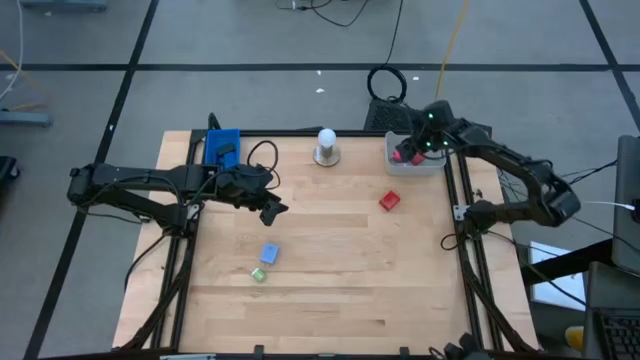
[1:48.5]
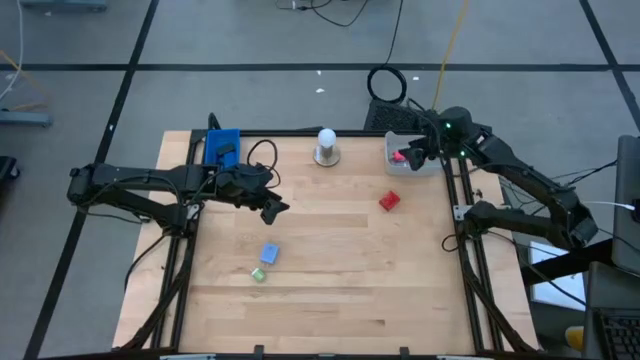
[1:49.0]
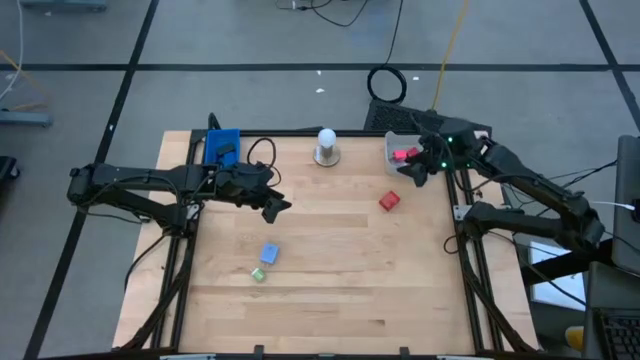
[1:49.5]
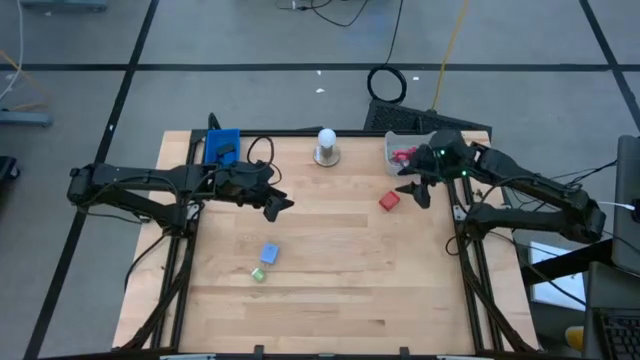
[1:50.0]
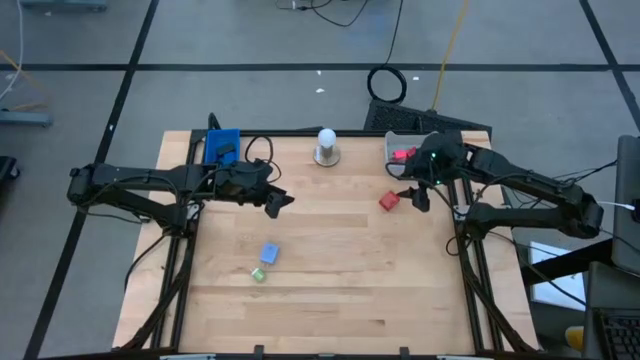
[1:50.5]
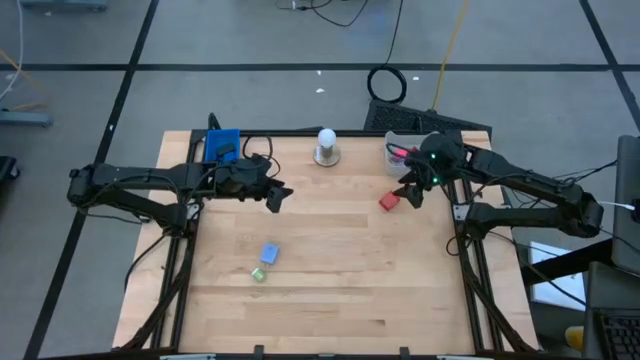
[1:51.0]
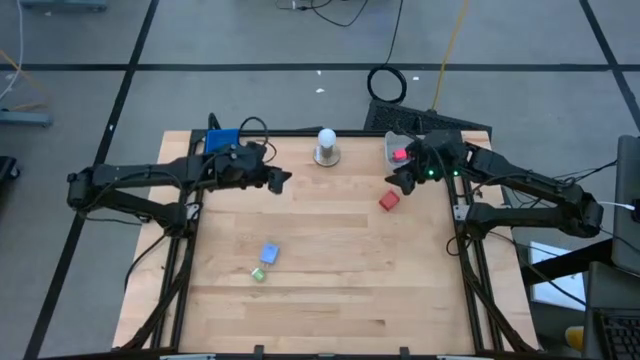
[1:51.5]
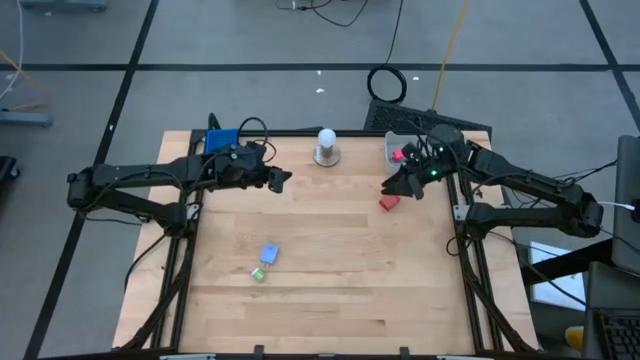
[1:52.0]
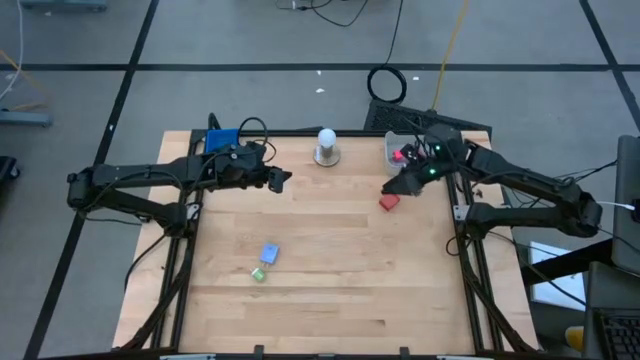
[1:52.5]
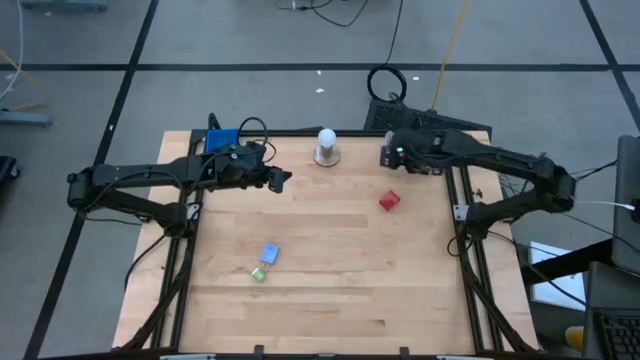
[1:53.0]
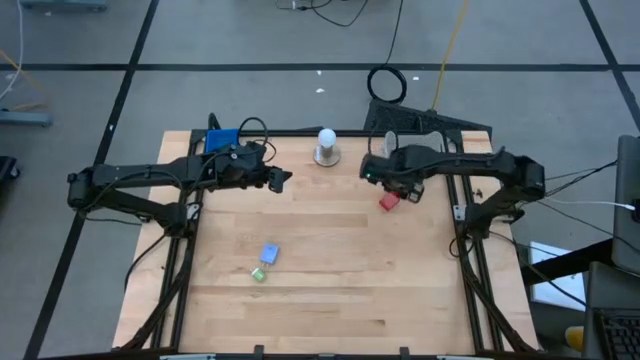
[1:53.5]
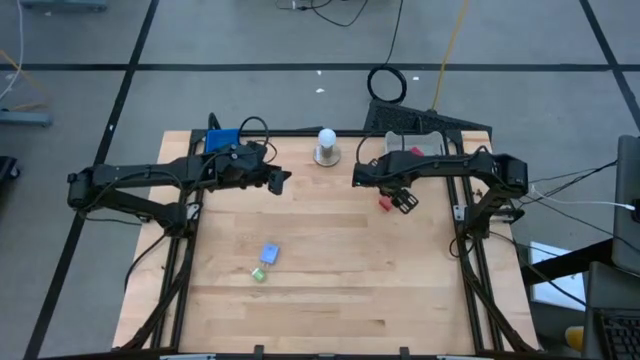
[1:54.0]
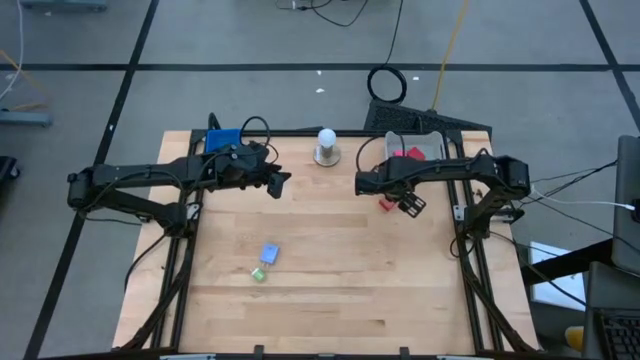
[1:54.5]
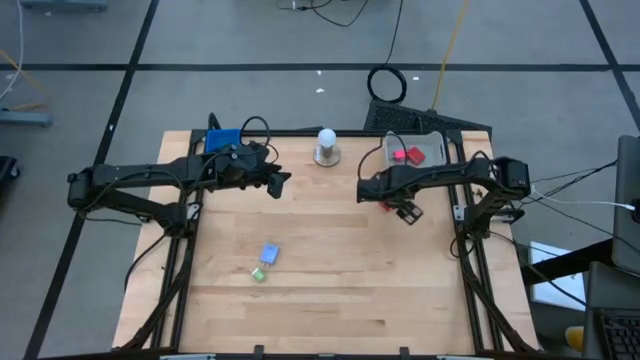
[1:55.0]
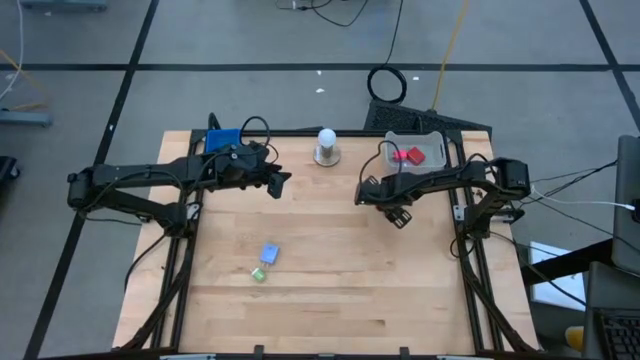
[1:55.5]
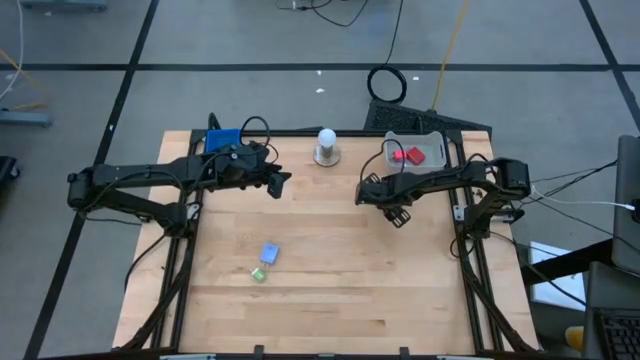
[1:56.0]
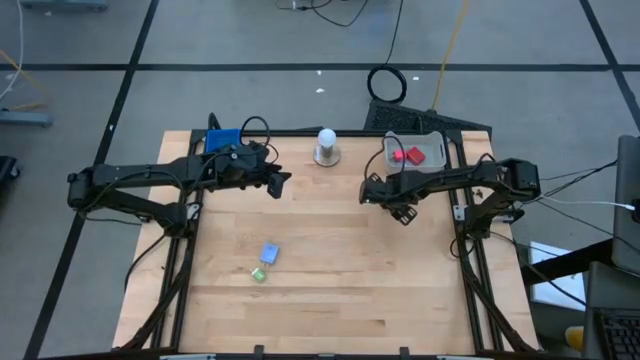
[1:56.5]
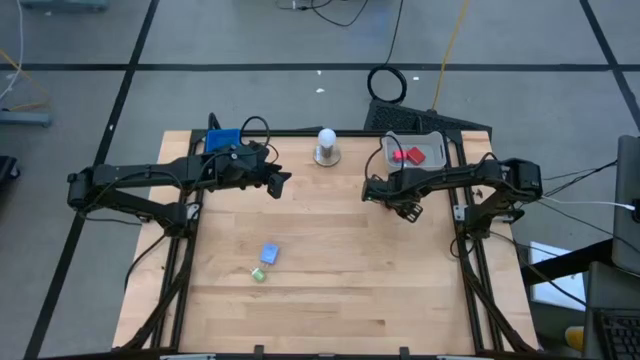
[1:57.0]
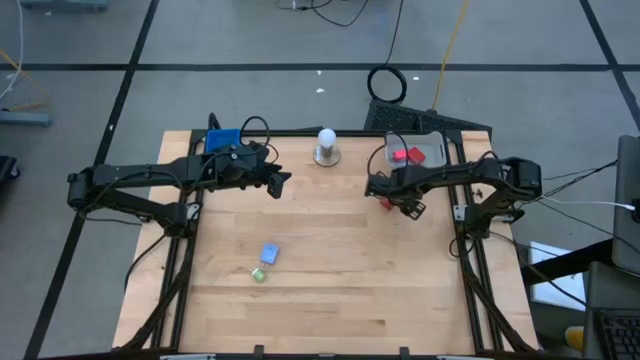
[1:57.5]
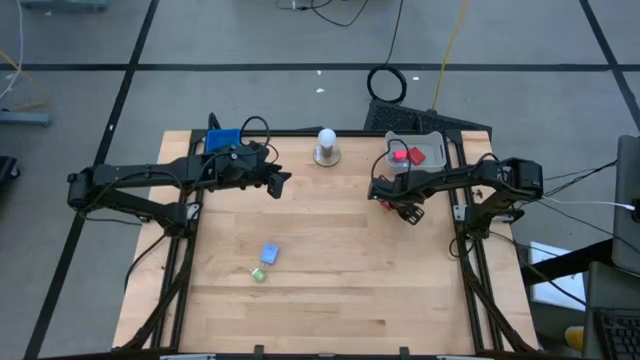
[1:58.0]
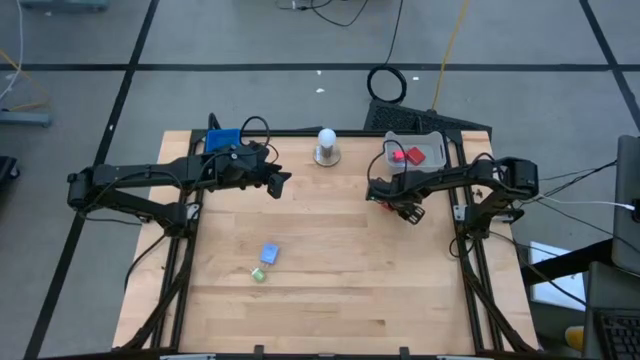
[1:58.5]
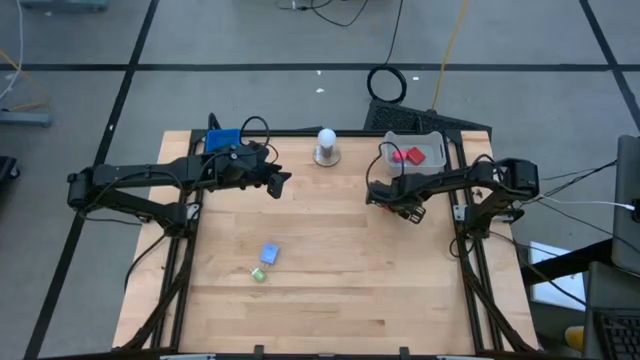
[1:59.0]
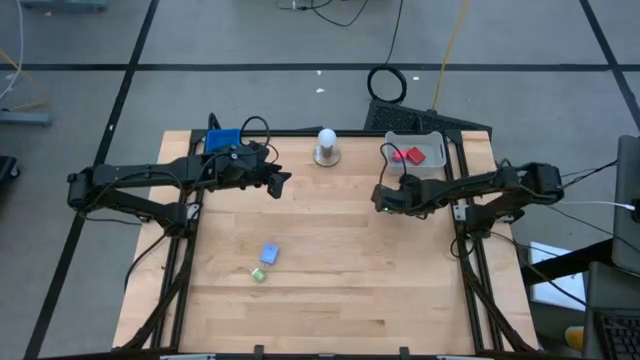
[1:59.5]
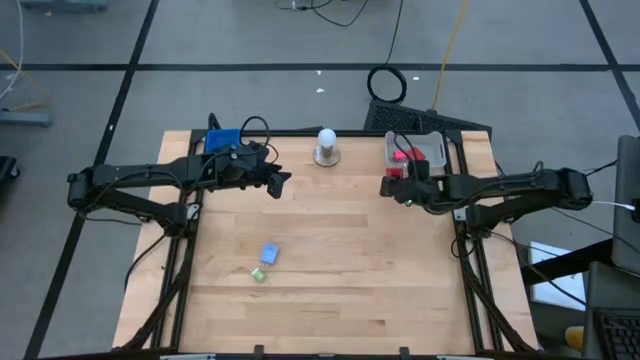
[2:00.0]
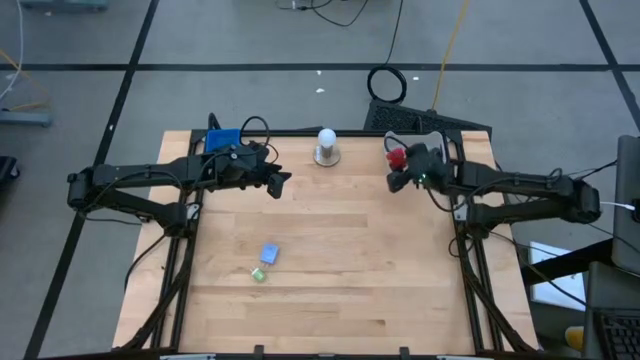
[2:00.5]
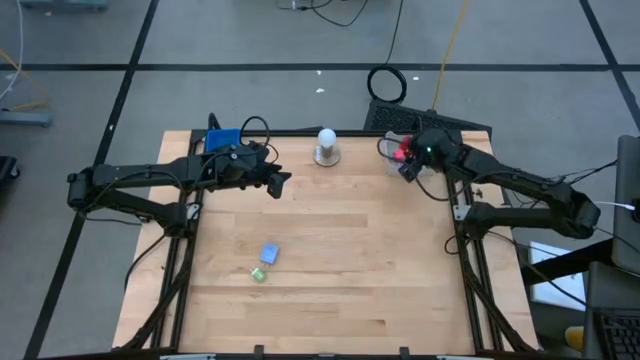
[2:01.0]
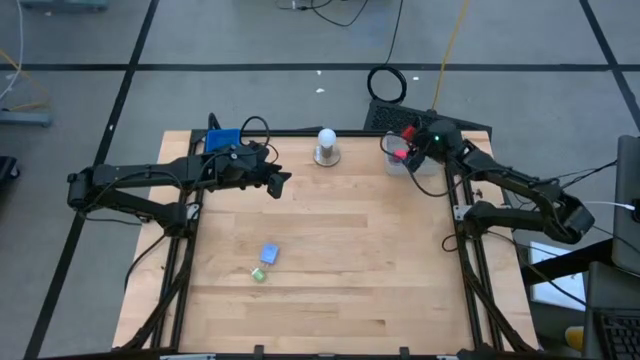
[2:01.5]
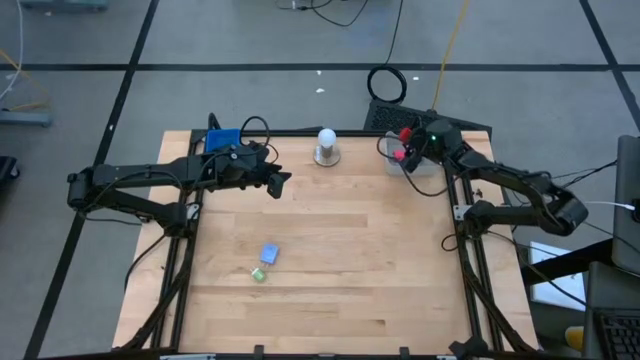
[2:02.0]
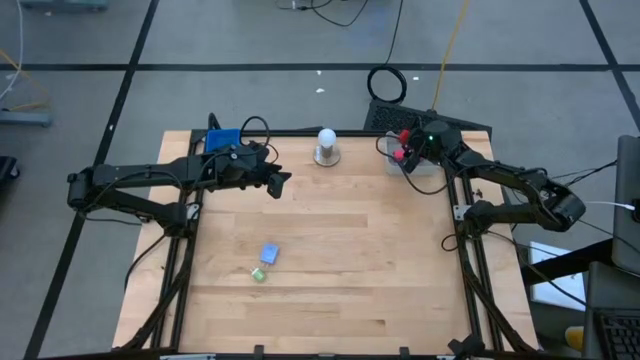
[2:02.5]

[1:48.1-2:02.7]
Task: Pick & Place Office items
Put the red charger adapter into the gray bin

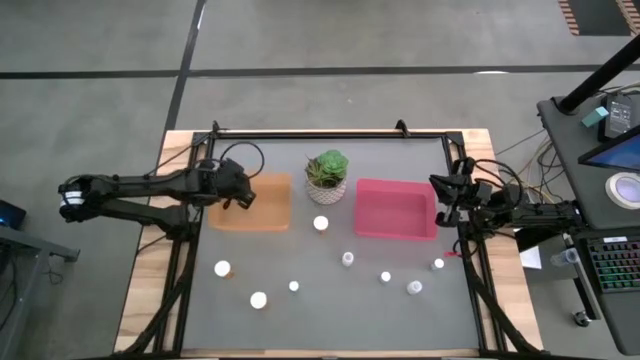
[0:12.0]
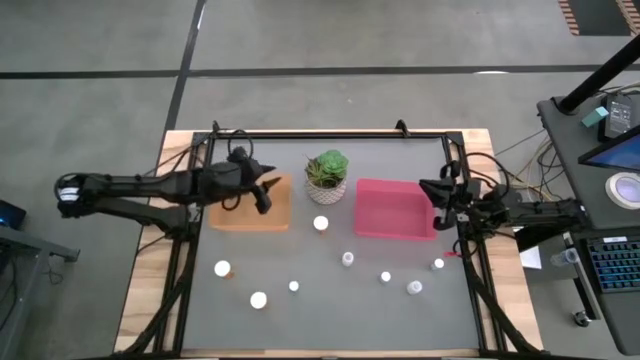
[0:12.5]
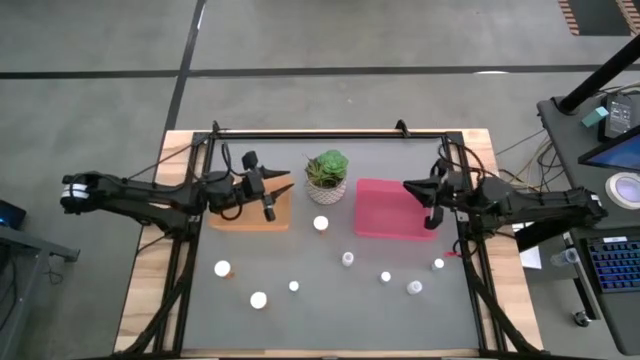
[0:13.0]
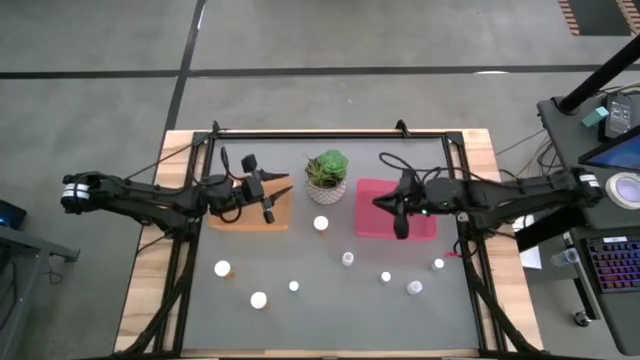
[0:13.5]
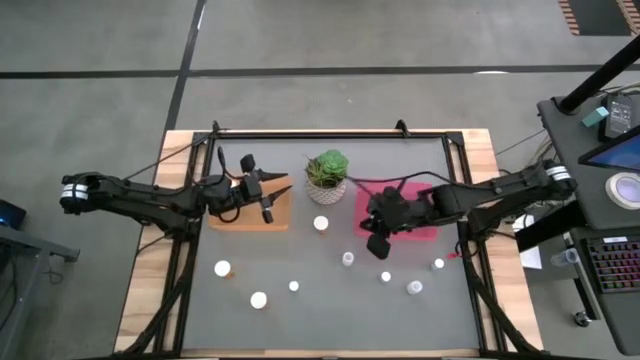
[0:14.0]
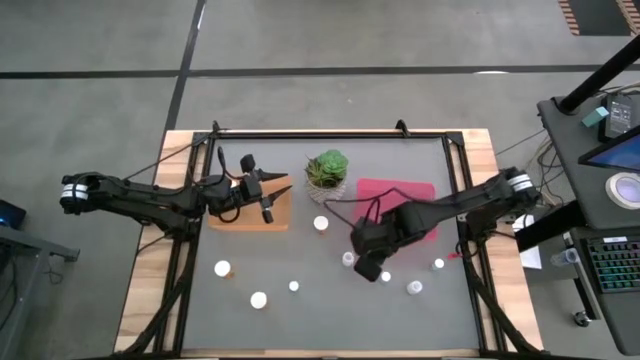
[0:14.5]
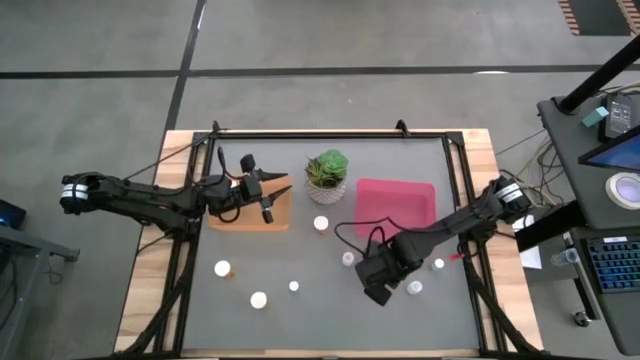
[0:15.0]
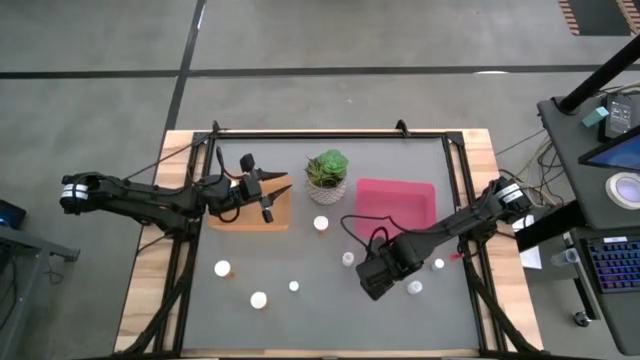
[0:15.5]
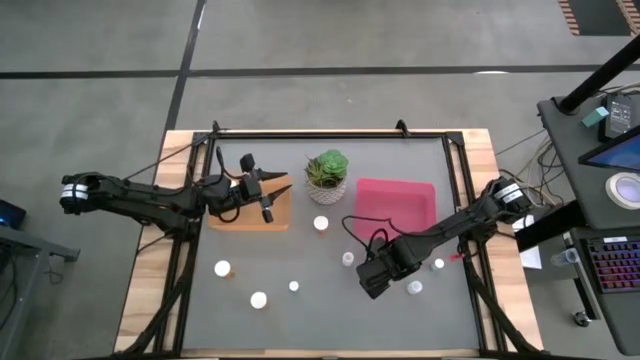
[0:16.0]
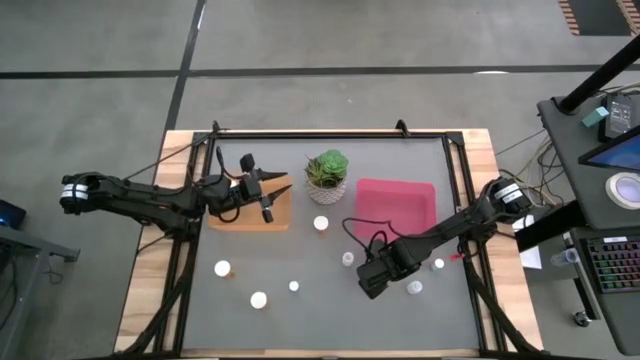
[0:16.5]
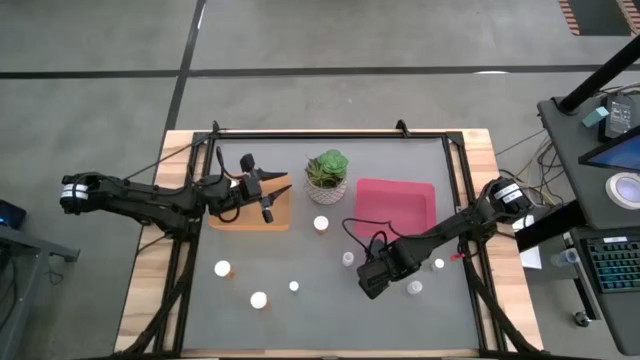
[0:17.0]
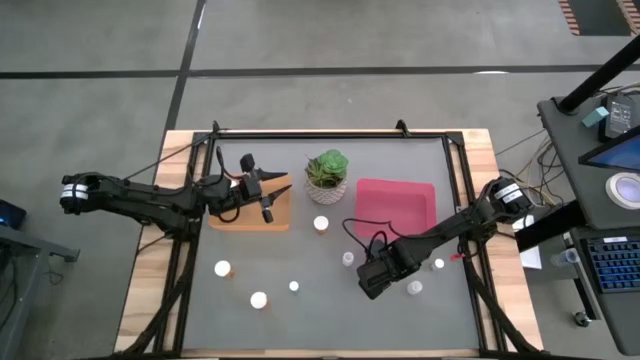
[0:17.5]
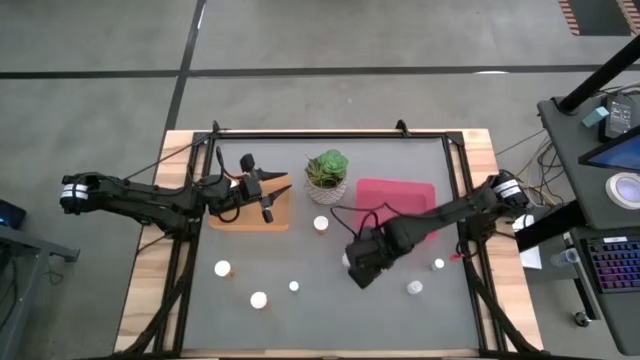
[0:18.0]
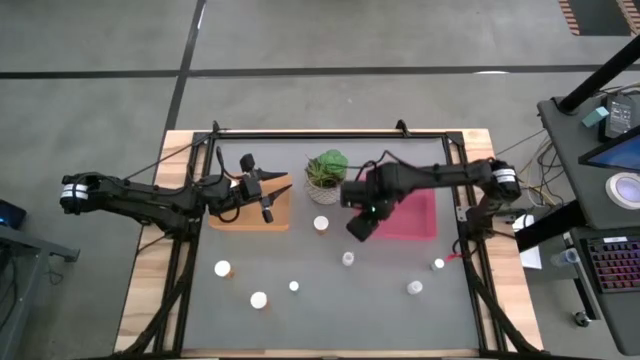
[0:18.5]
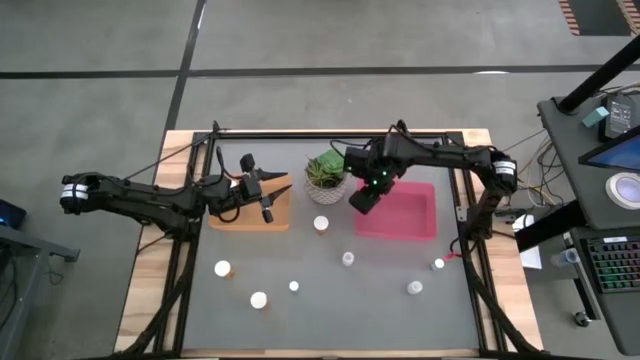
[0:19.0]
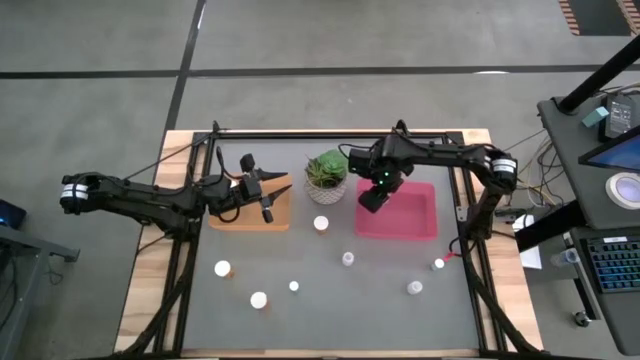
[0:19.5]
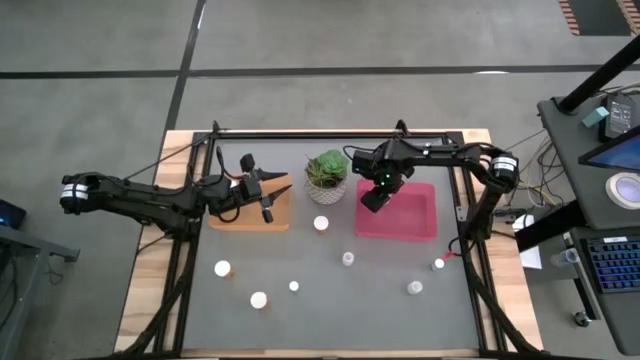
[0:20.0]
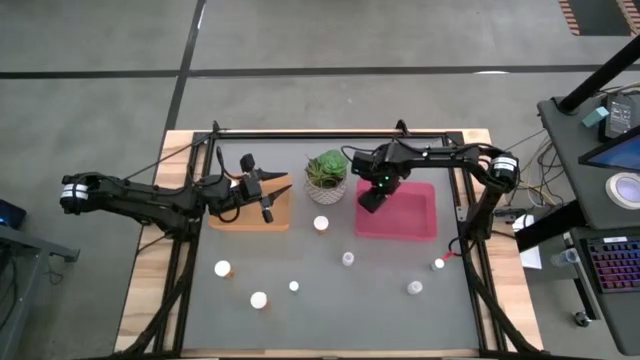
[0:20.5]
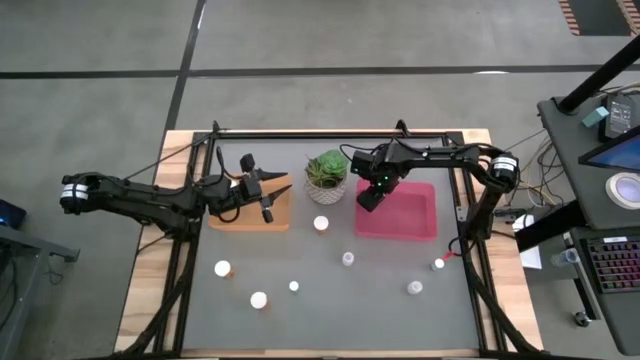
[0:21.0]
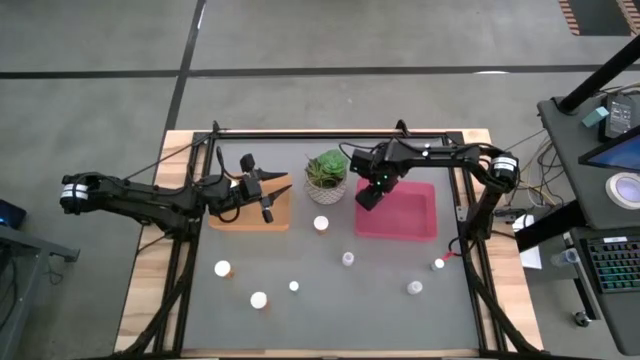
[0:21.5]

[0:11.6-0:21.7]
Task: Pick and place medicine bottles into bin by pill shape (circle, oval)
Put the middle small blue pill bottle in the pink bin
